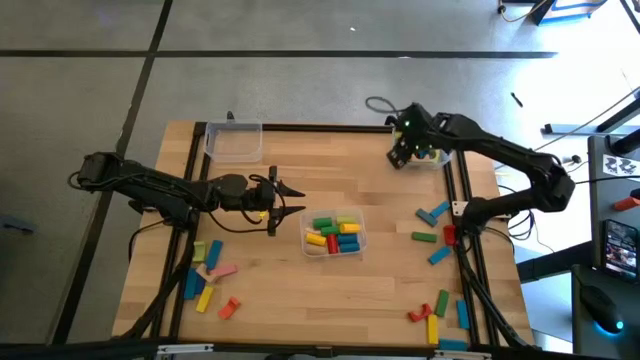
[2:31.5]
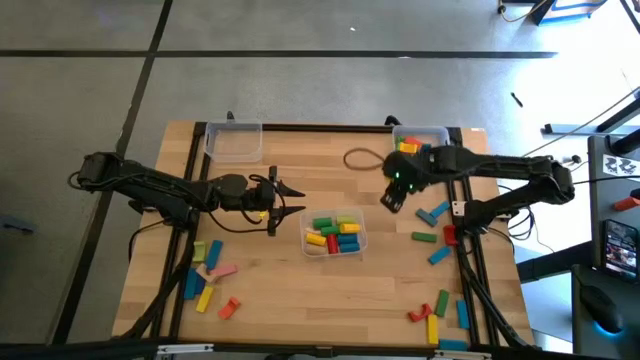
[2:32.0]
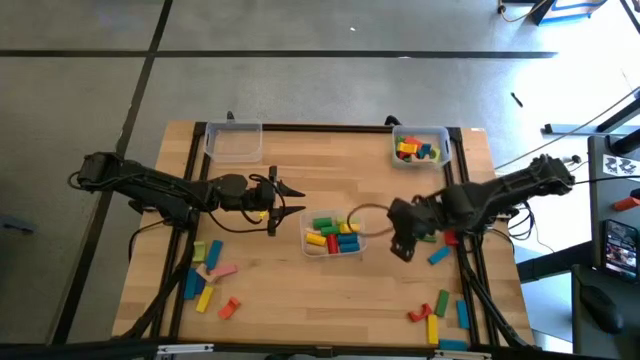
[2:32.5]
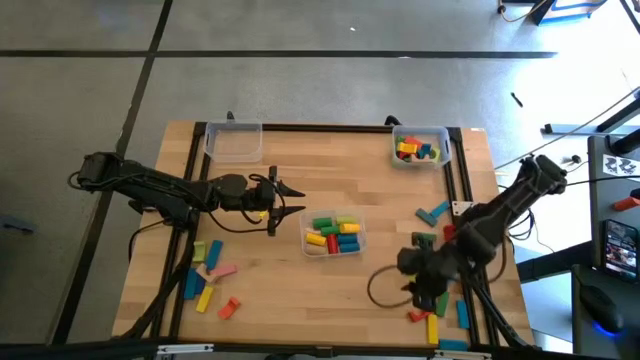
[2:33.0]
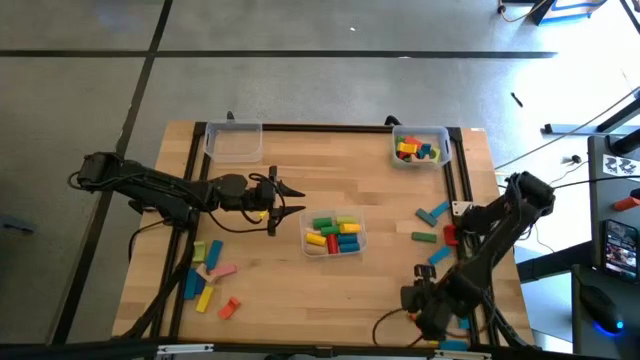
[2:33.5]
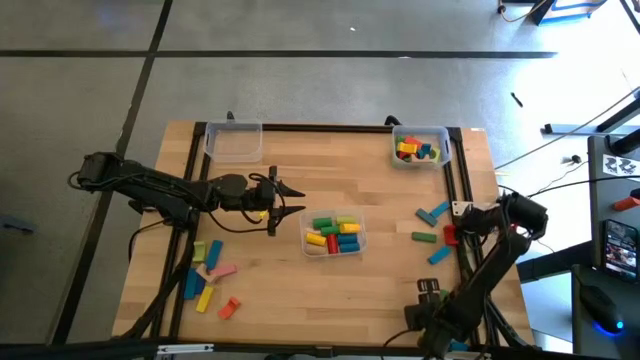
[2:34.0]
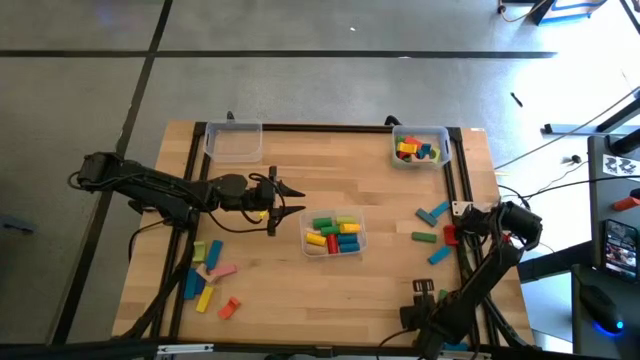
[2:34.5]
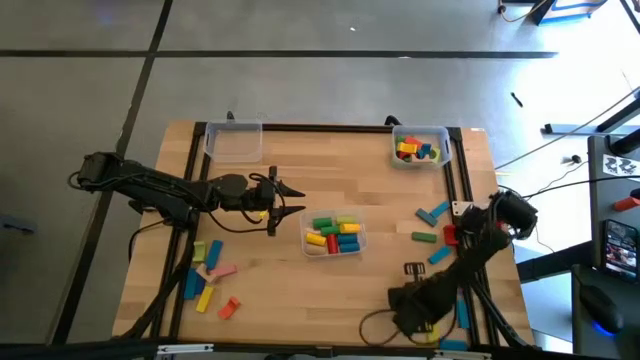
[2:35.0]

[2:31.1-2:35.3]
Task: Sort blocks by size
Put the red arch block into the top right transparent bin

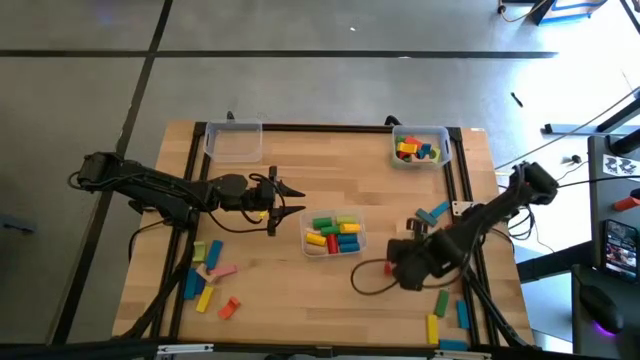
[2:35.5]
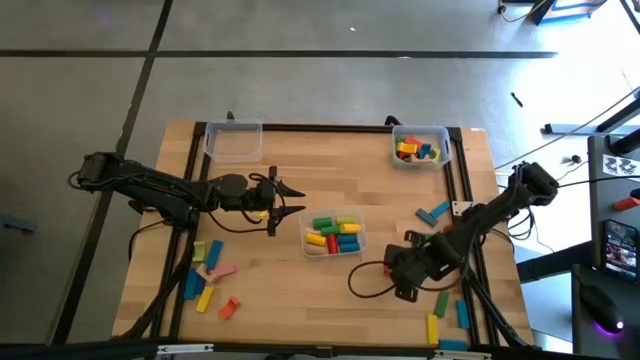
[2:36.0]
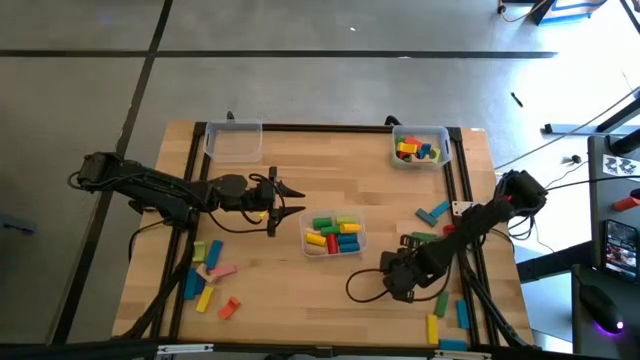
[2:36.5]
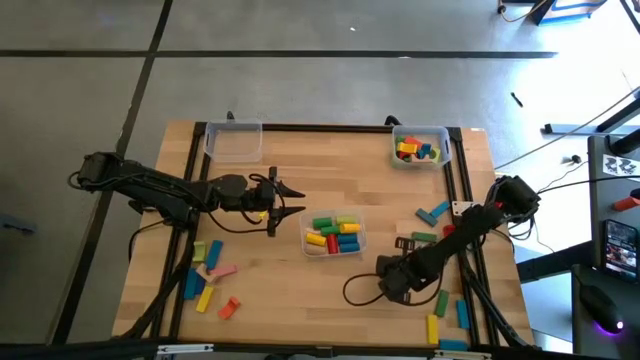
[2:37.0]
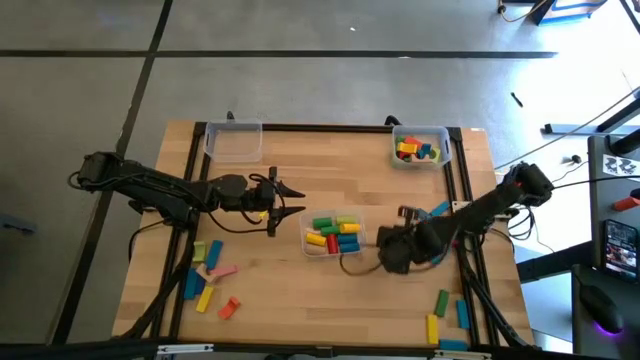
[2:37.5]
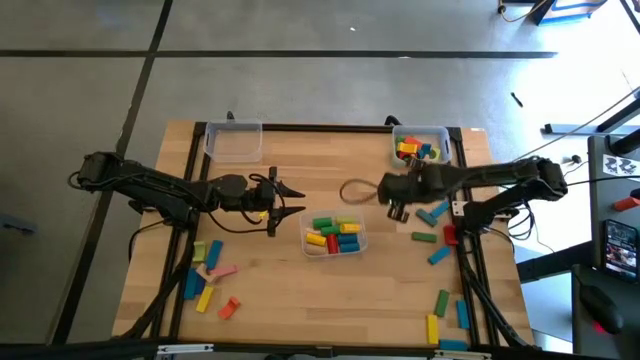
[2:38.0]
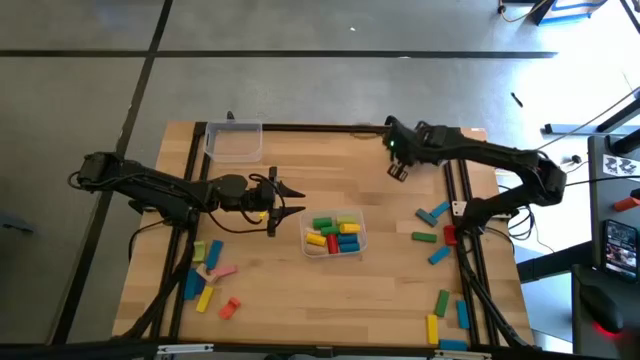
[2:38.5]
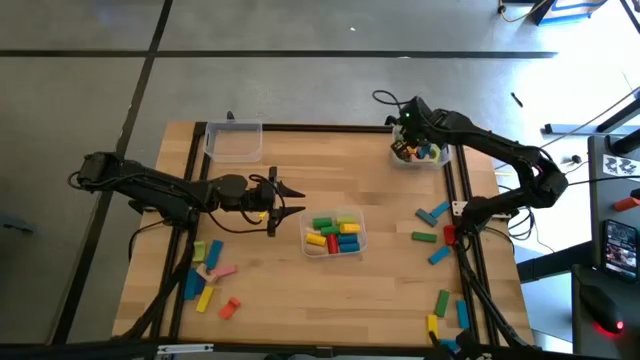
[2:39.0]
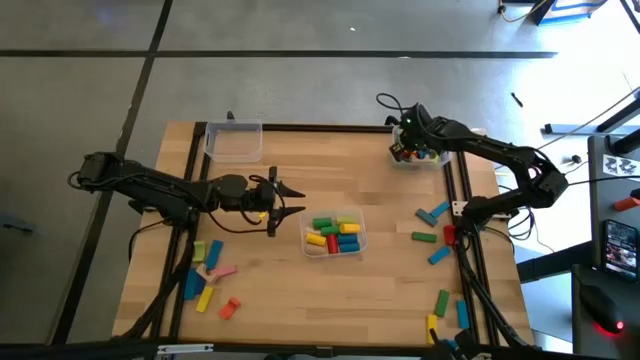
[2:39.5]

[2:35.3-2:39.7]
Put the red arch block into the top right transparent bin

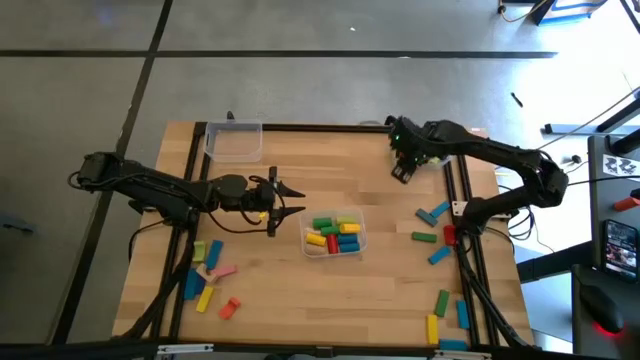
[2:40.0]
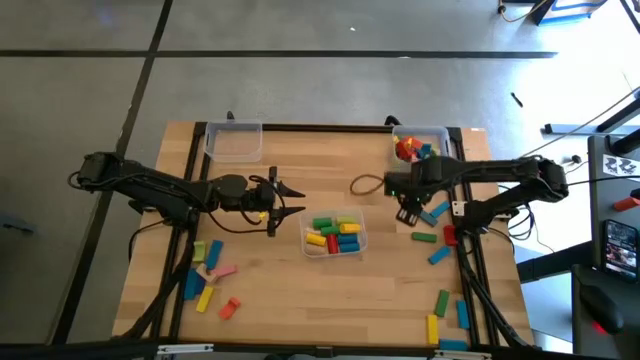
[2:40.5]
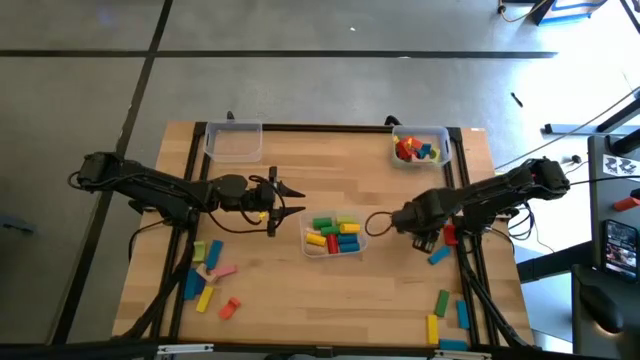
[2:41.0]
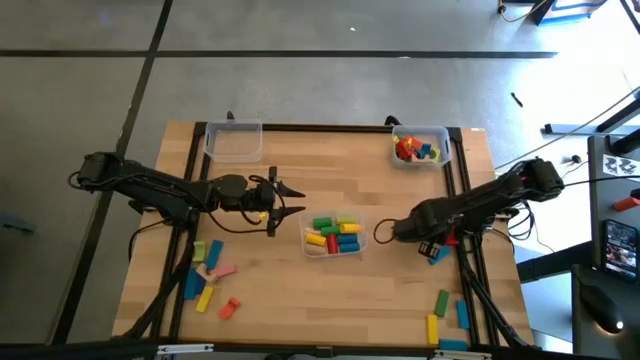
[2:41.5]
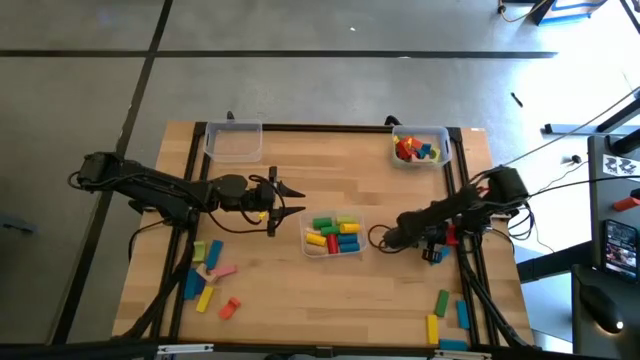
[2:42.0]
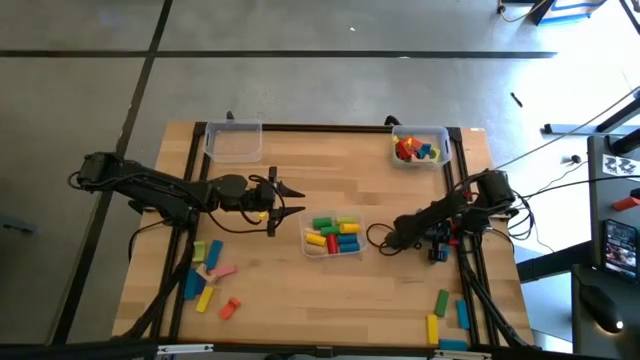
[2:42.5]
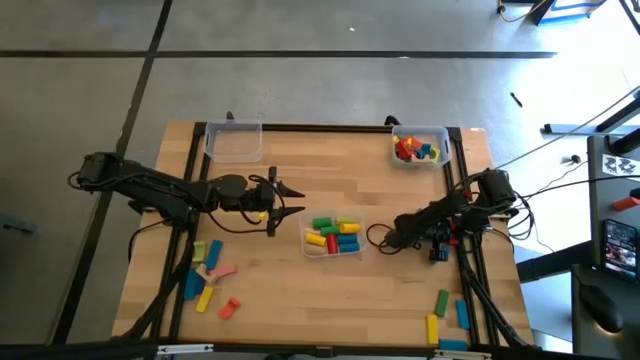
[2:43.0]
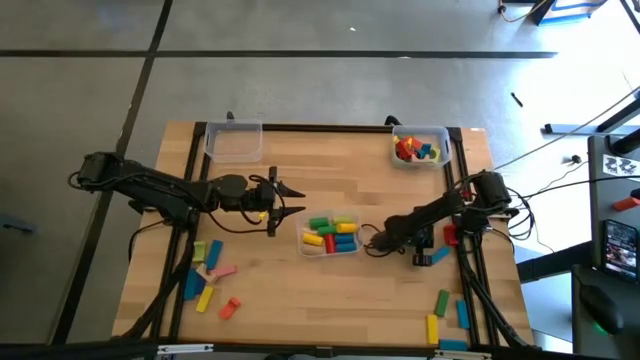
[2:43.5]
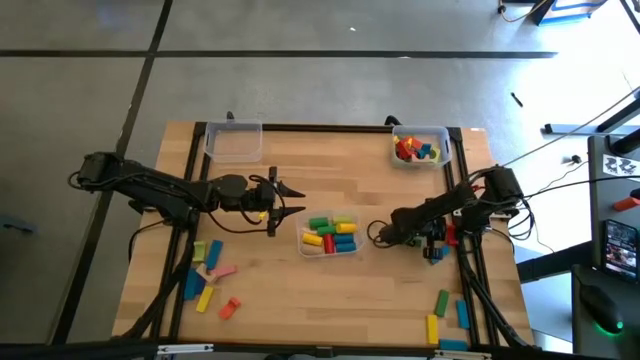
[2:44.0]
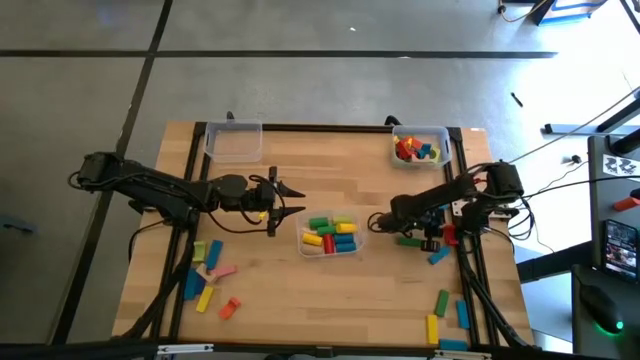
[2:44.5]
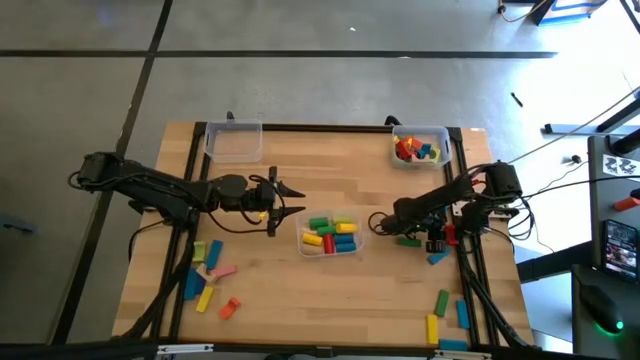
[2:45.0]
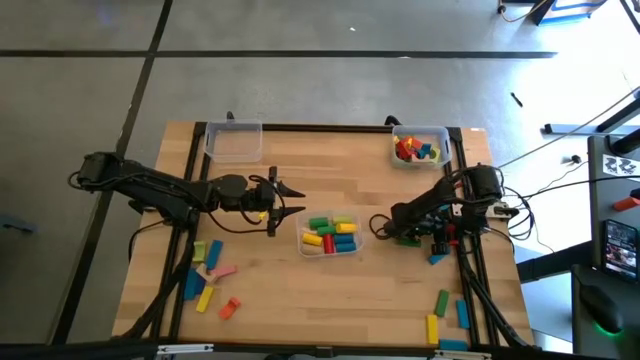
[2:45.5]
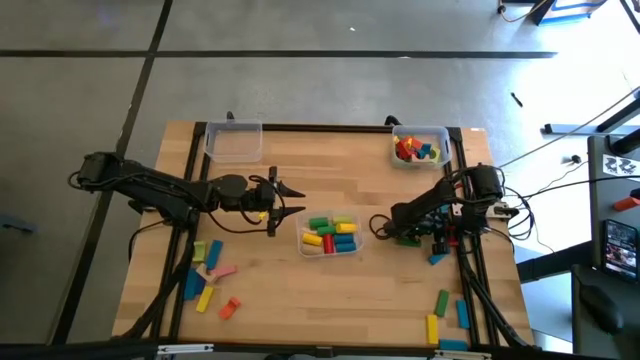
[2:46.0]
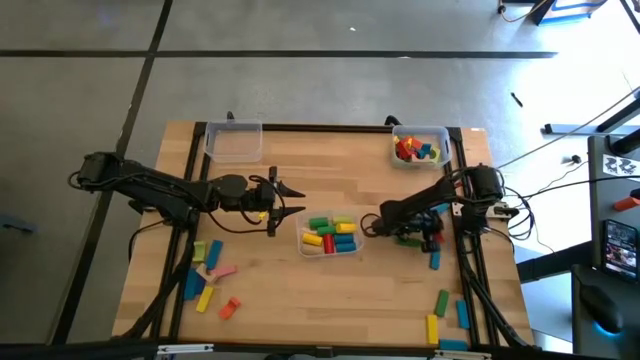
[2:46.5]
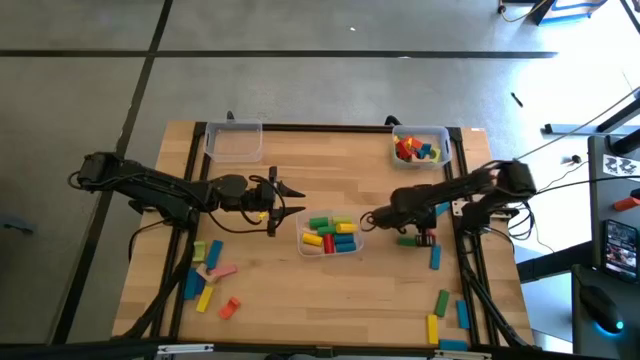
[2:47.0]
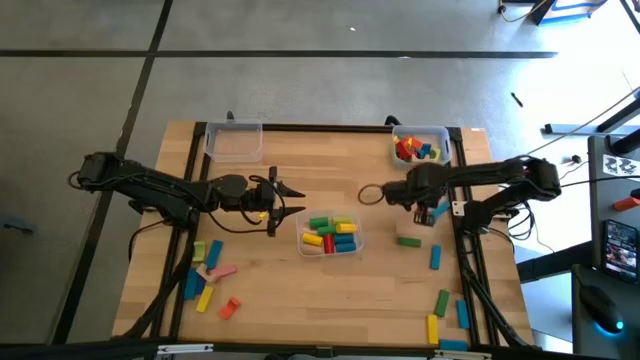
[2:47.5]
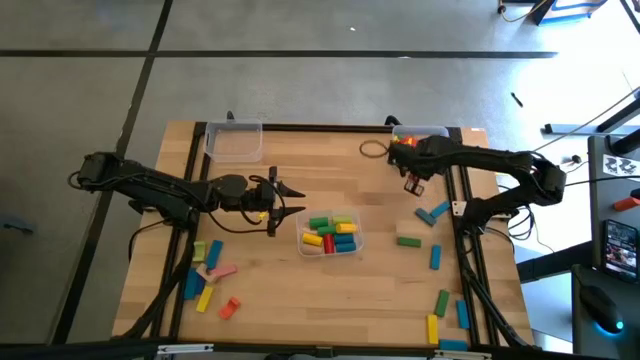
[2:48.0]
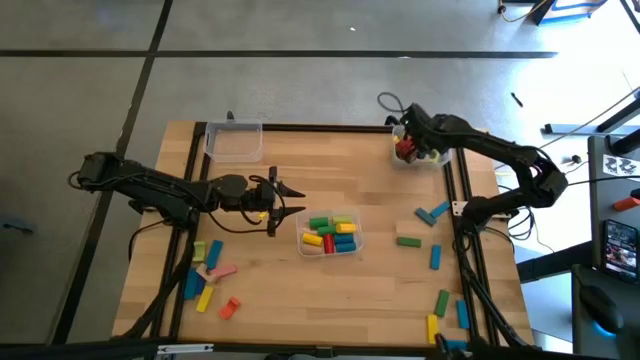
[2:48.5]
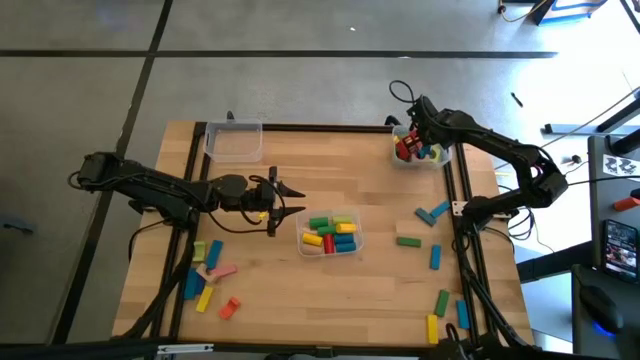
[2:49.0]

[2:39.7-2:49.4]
Put the red arch block into the top right transparent bin

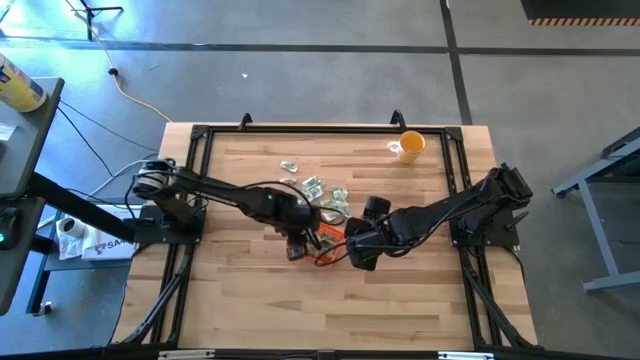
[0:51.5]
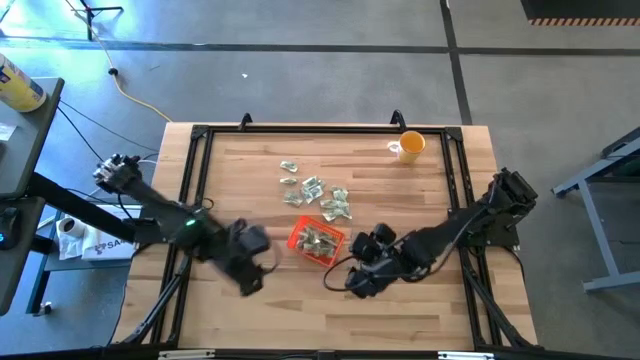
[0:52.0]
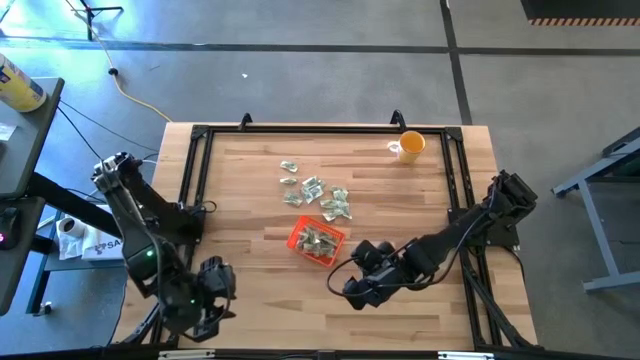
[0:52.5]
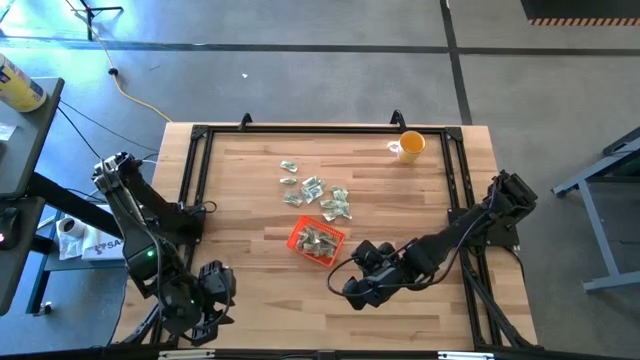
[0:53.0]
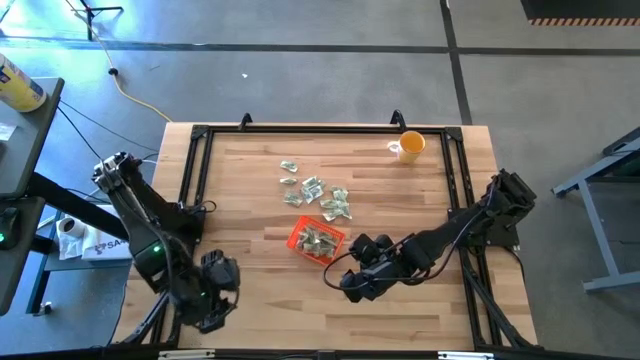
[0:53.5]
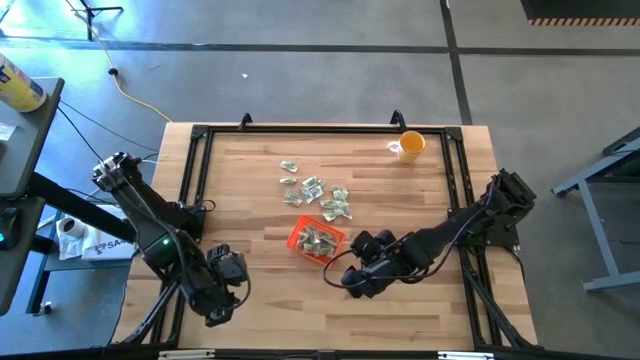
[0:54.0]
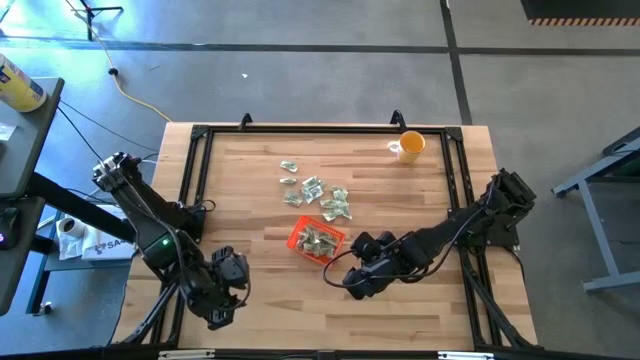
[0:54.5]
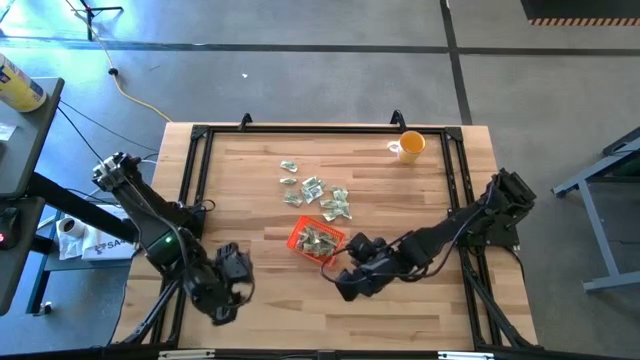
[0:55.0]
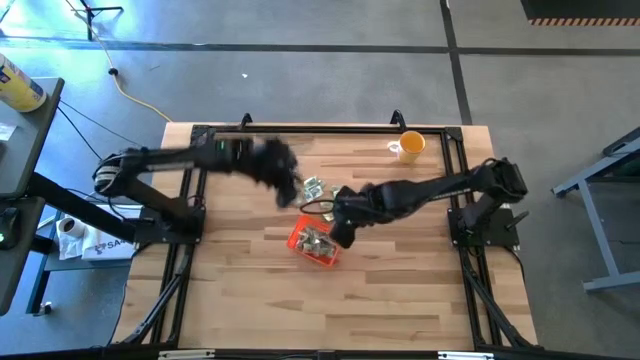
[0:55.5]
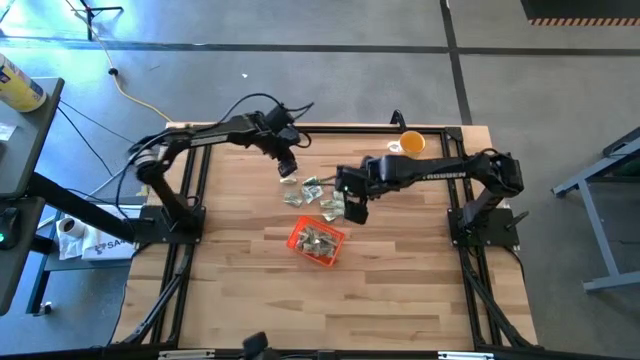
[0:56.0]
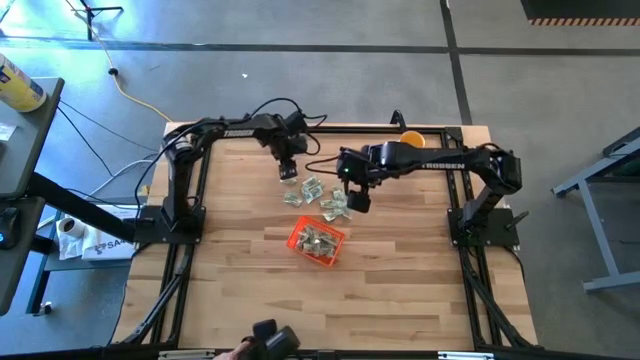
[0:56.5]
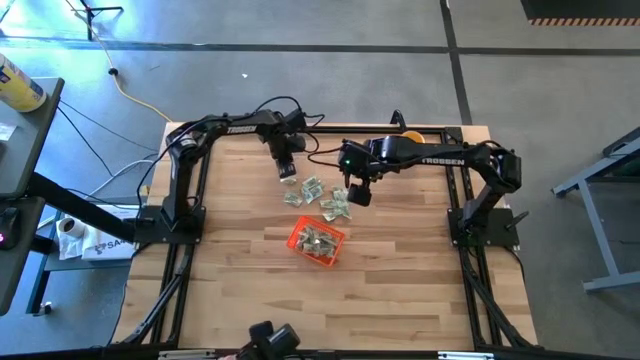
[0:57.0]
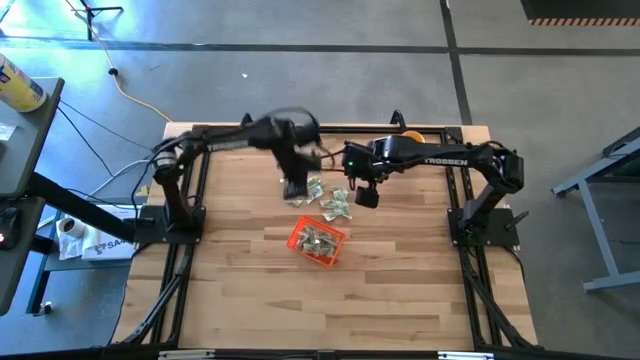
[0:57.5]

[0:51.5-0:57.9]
Task: Pick and place Stevia / Truvia into bins
Put the stevia packet into the orange bin
